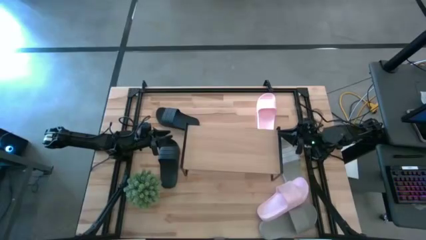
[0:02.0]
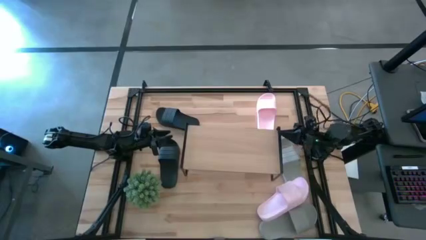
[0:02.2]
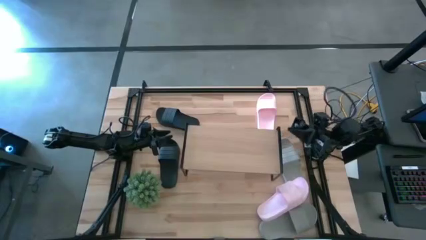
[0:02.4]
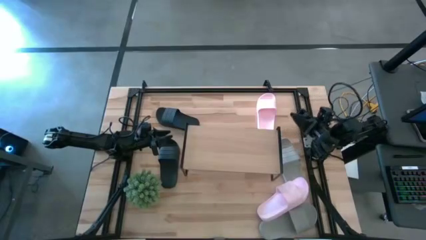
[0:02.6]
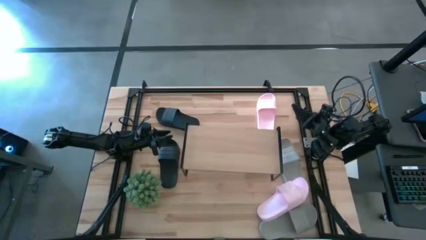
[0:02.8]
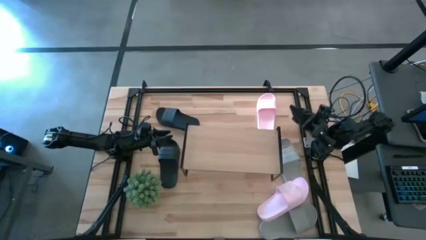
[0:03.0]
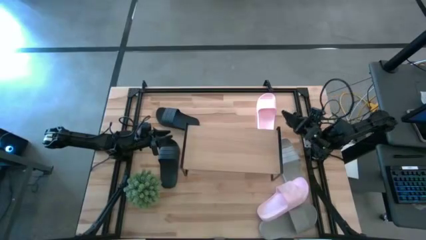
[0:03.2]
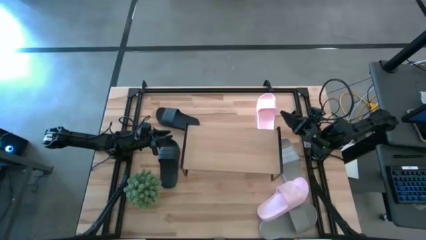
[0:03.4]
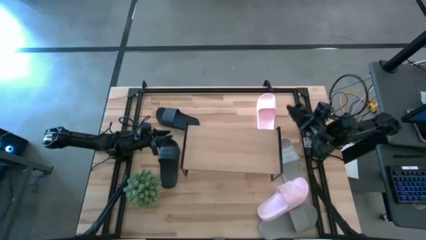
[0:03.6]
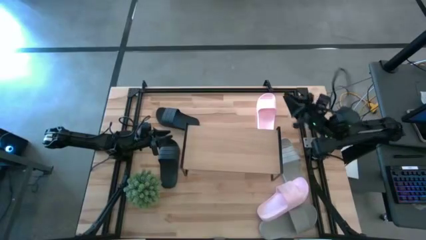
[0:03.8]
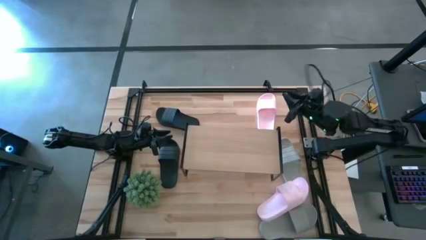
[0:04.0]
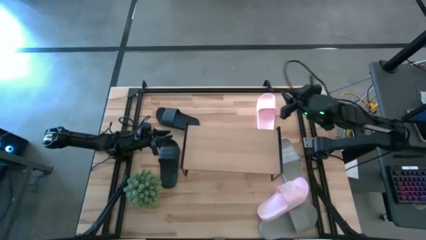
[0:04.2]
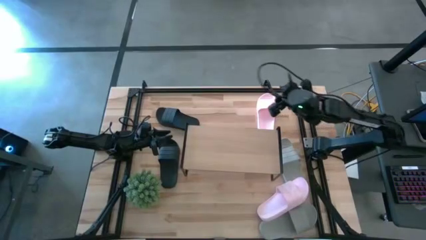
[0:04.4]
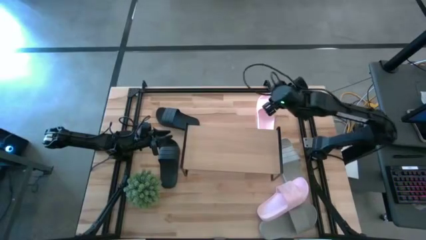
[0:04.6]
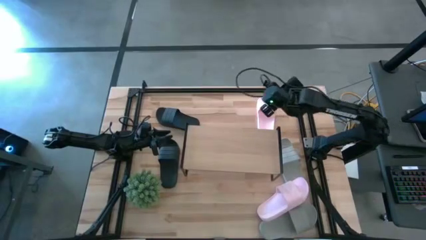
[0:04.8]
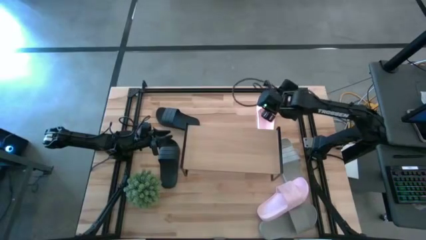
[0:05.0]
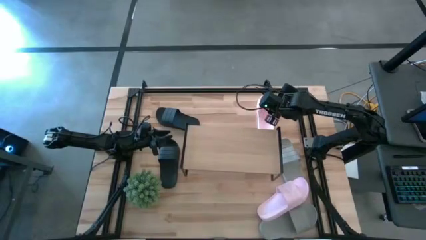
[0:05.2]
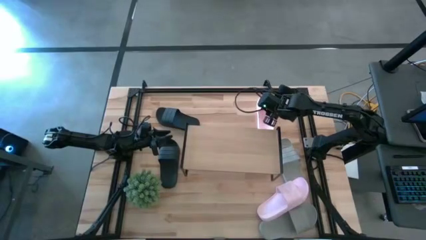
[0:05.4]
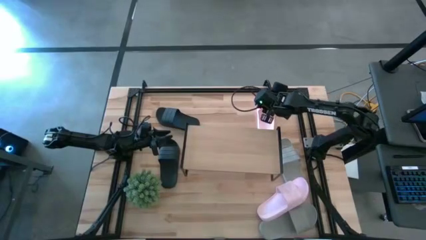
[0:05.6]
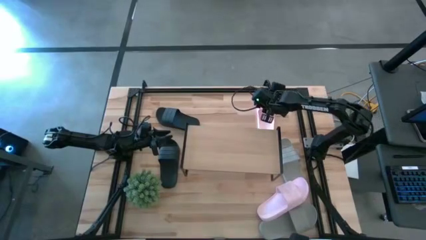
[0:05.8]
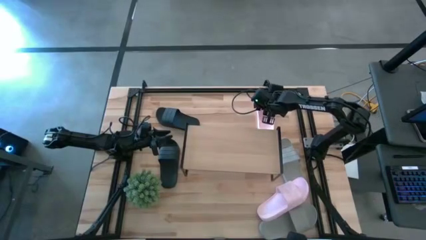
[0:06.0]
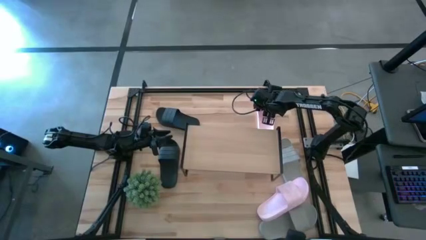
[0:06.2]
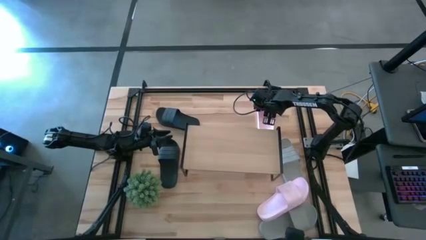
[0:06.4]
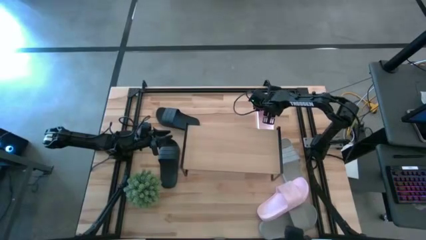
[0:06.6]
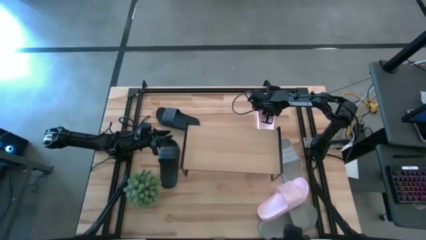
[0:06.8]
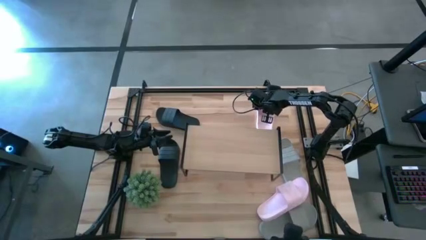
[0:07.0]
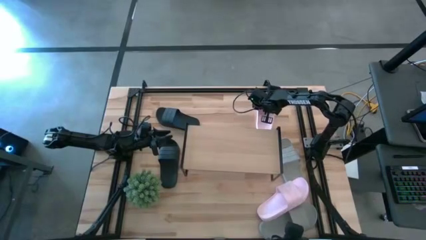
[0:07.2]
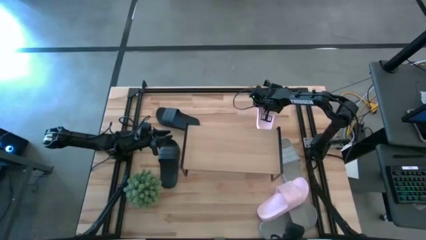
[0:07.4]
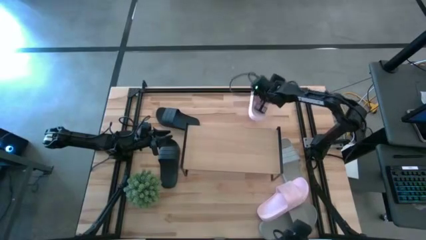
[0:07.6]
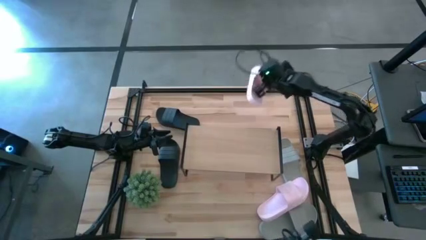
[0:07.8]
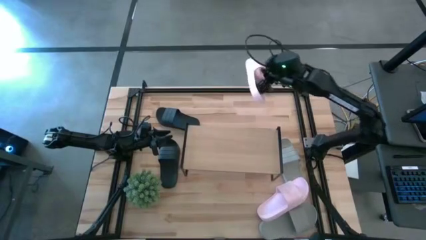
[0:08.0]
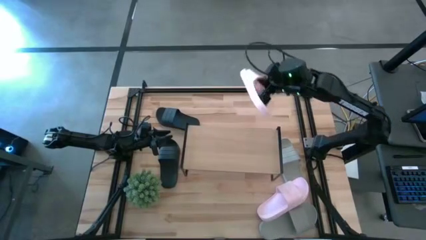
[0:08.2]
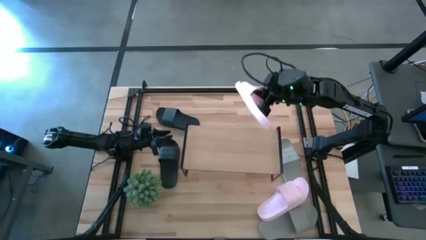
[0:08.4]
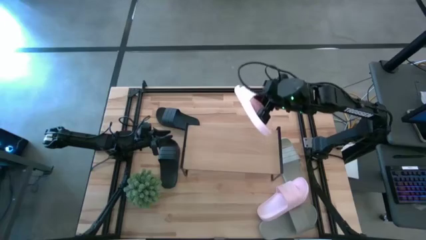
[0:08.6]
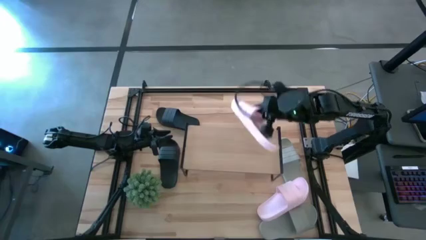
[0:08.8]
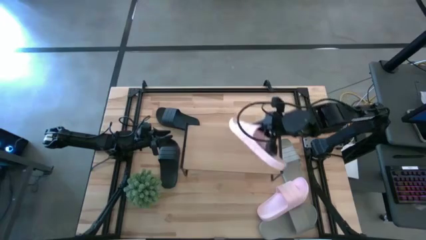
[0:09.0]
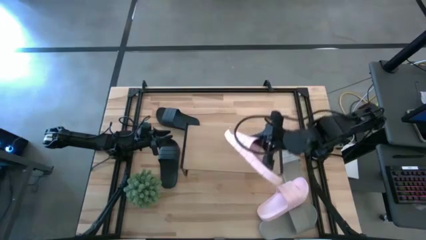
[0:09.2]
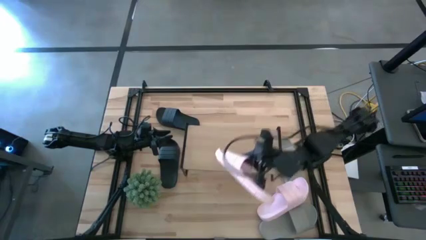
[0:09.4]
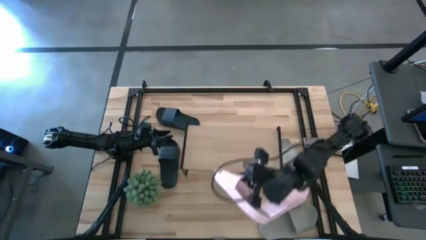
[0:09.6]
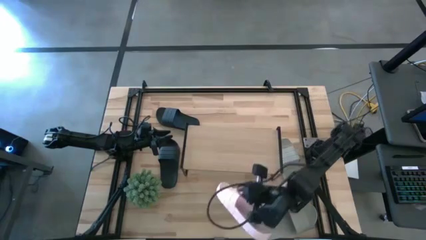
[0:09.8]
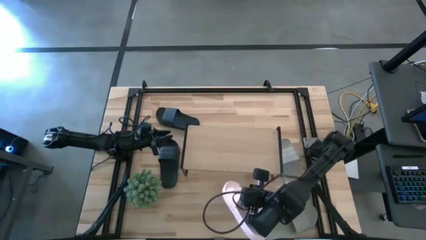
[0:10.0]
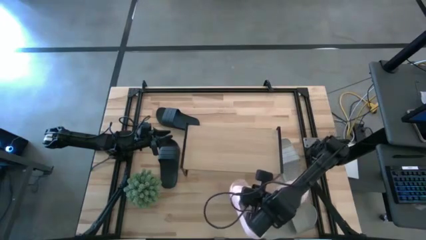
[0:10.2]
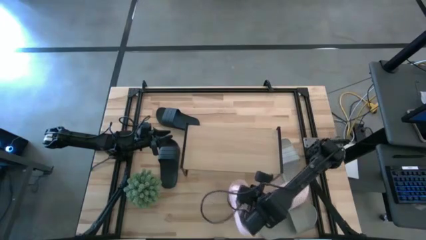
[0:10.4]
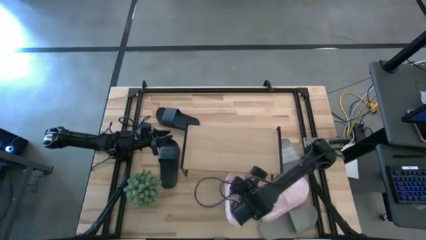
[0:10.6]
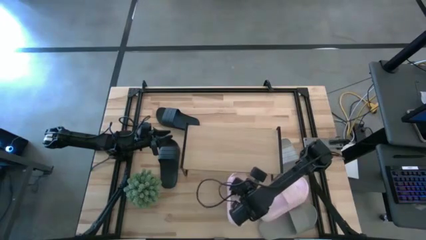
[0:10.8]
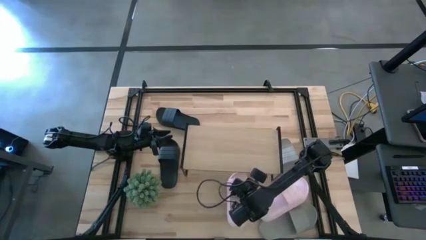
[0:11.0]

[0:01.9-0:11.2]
Task: Pick and place slides into the shelf
Put the top pink slide under the shelf

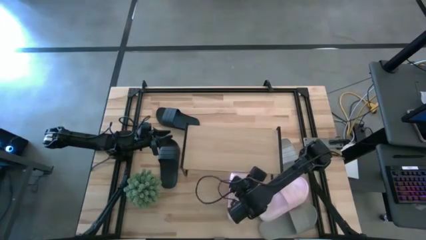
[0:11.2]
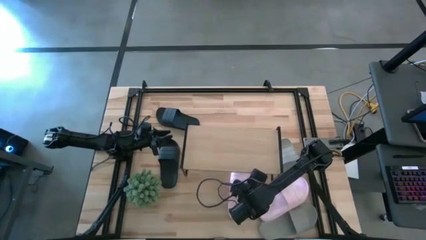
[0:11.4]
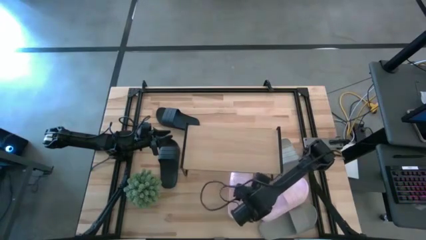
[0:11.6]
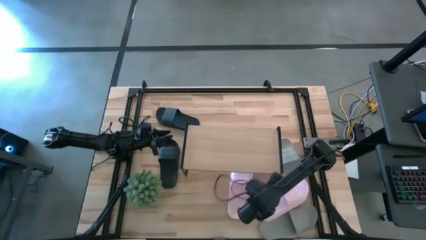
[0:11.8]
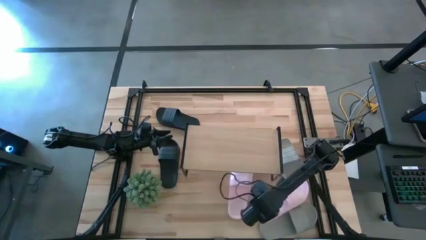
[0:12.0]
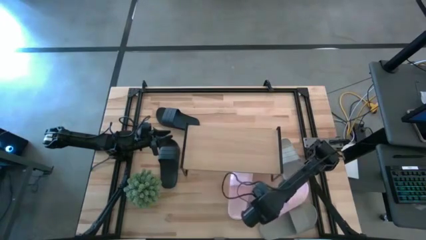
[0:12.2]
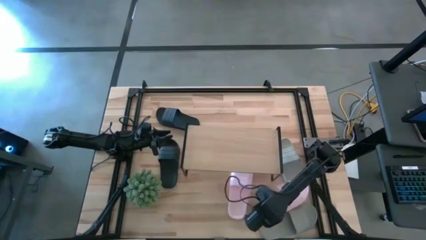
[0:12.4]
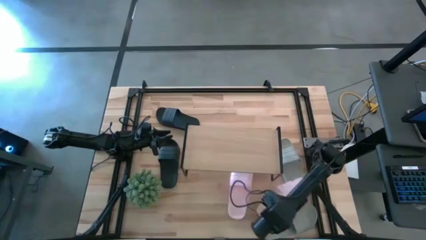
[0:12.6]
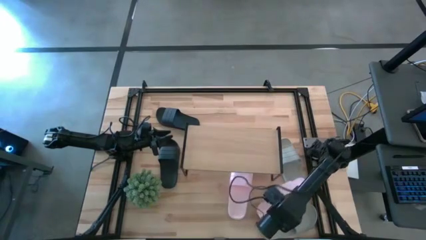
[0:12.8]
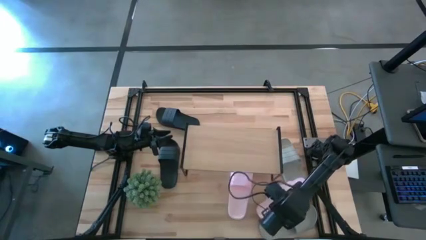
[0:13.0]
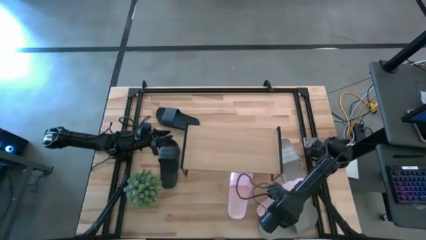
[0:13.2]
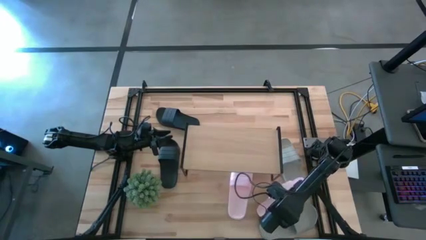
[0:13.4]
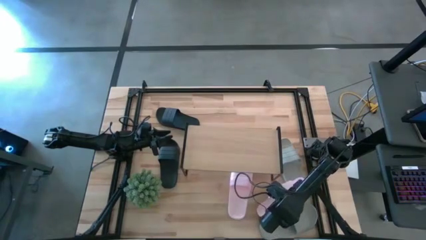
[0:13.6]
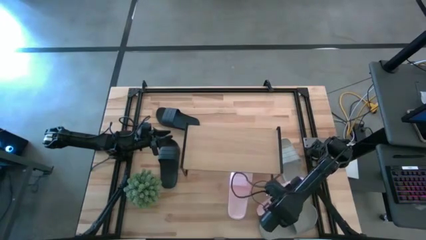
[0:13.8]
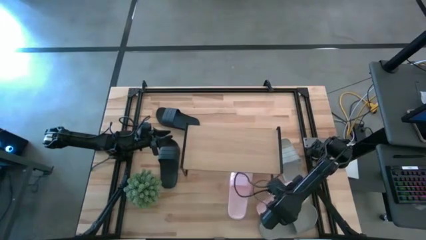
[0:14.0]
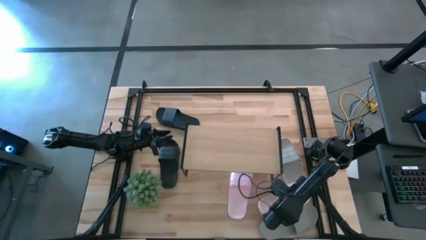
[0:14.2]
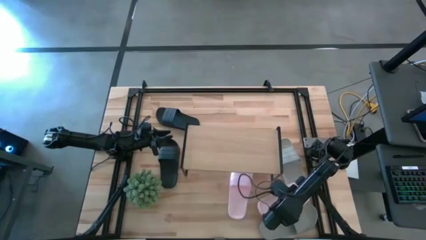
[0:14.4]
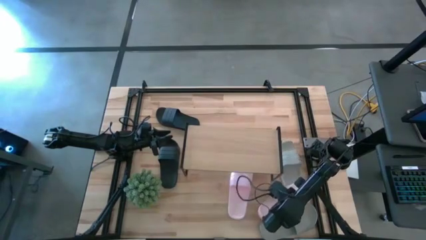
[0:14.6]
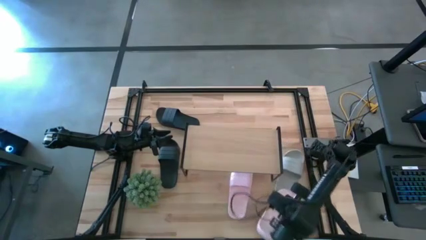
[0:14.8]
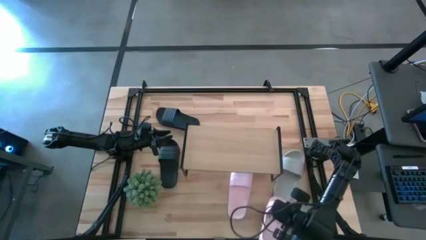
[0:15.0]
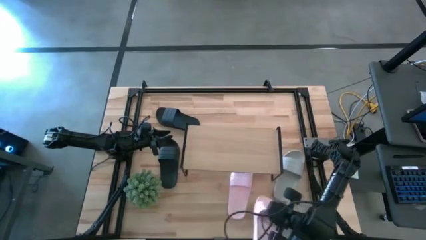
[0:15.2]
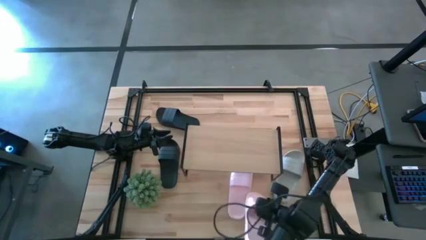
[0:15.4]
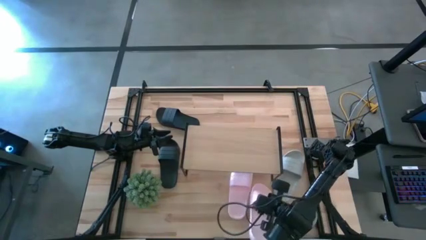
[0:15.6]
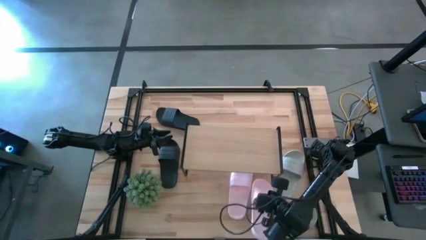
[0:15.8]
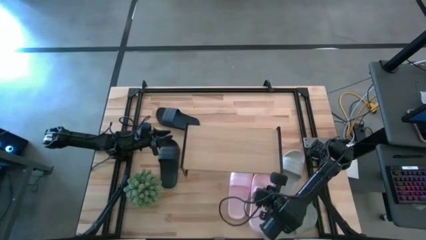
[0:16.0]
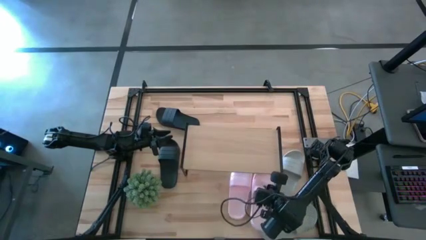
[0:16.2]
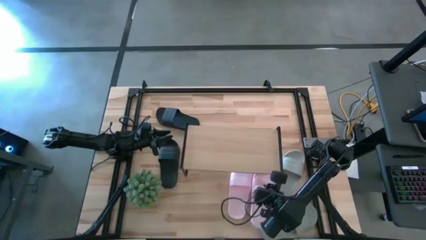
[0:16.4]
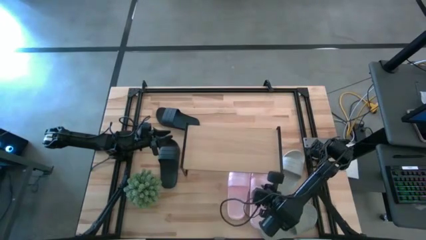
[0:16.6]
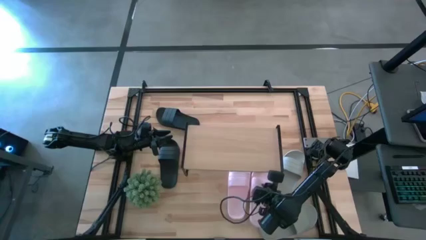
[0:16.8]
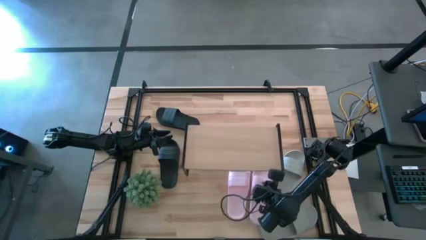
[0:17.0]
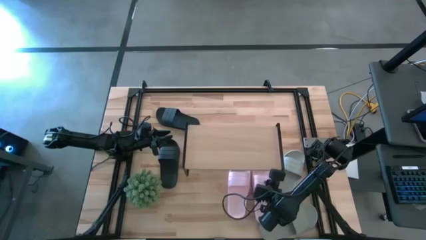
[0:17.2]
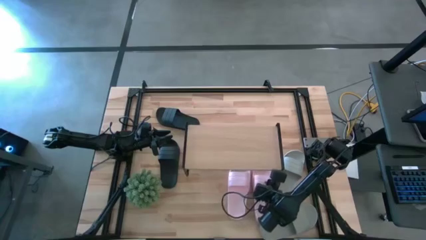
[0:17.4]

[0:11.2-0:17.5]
Put the pink slide under the shelf
